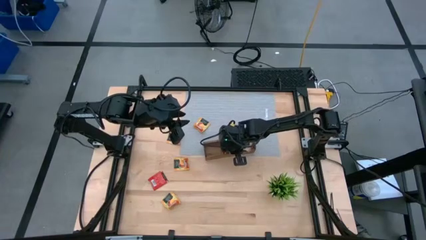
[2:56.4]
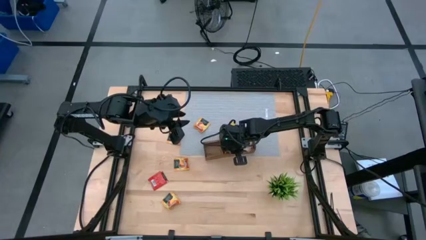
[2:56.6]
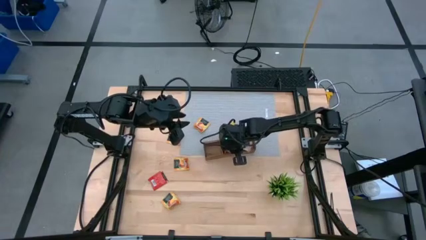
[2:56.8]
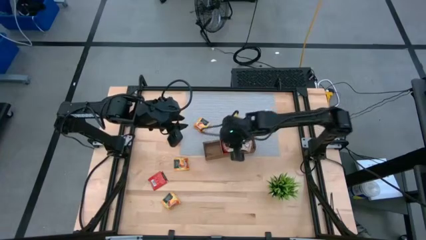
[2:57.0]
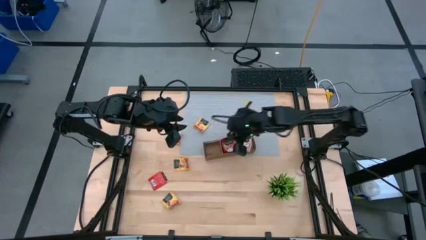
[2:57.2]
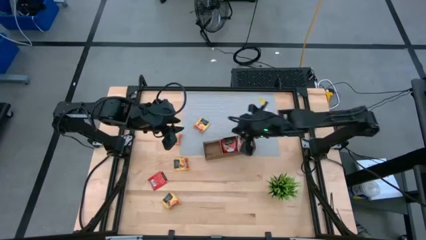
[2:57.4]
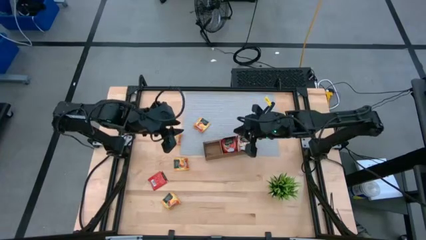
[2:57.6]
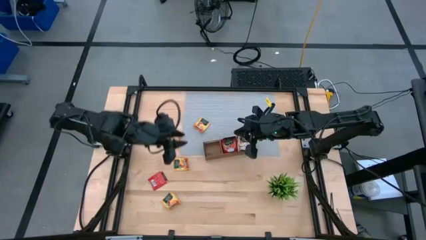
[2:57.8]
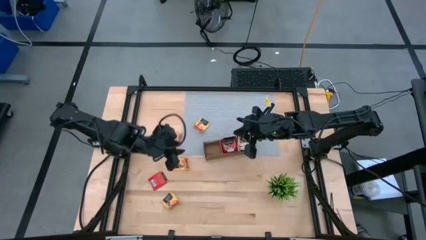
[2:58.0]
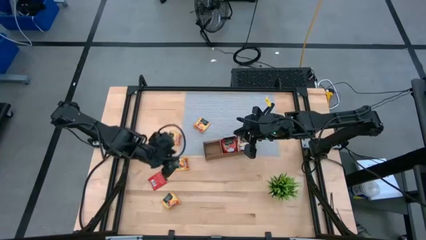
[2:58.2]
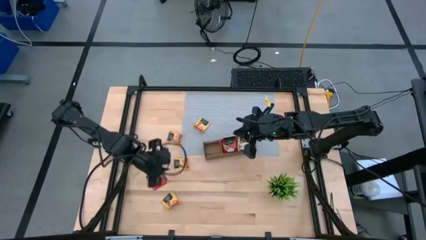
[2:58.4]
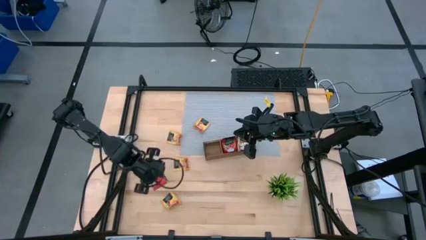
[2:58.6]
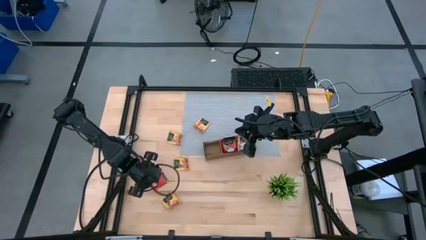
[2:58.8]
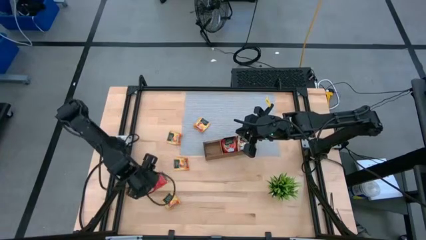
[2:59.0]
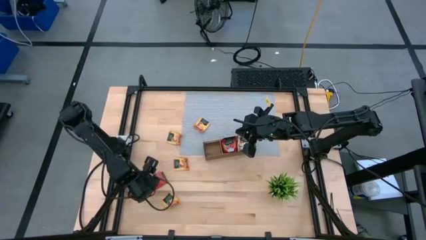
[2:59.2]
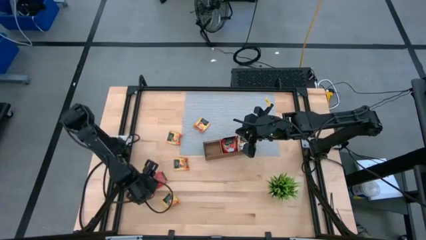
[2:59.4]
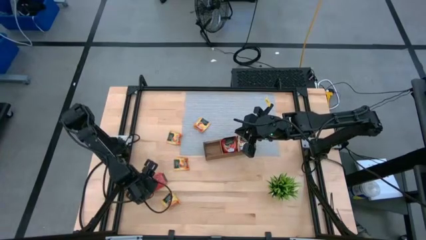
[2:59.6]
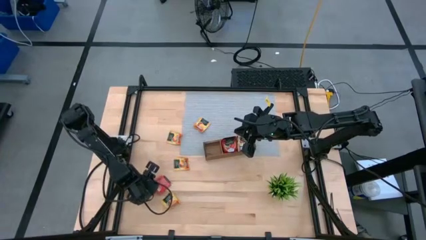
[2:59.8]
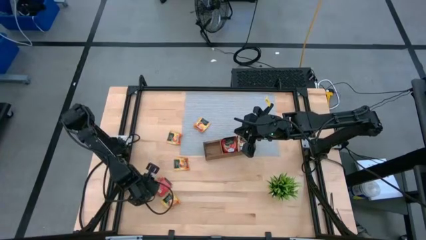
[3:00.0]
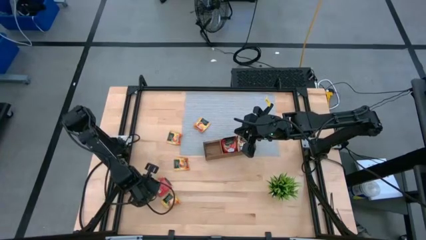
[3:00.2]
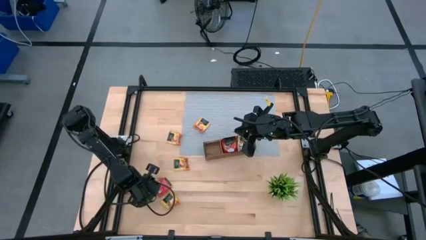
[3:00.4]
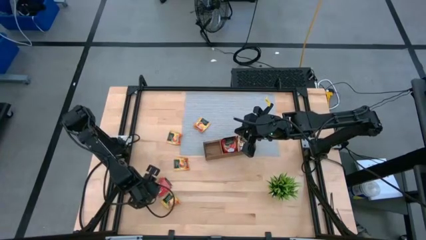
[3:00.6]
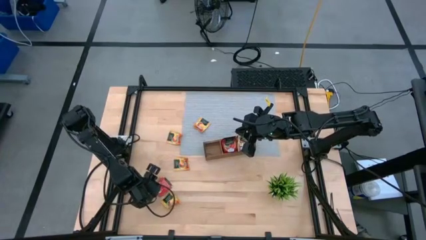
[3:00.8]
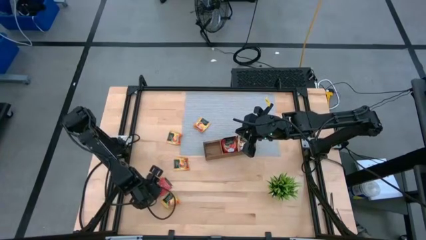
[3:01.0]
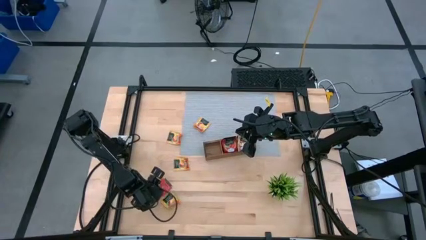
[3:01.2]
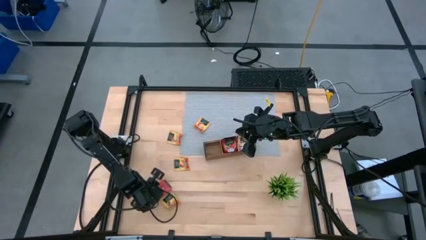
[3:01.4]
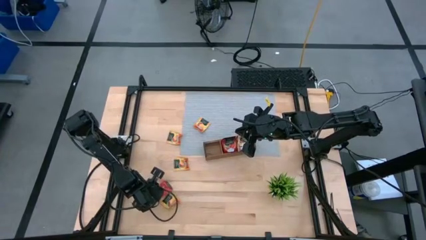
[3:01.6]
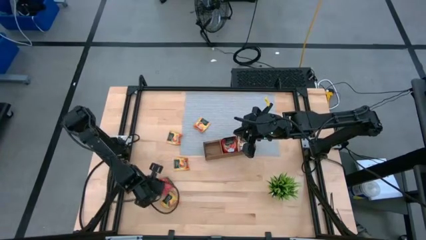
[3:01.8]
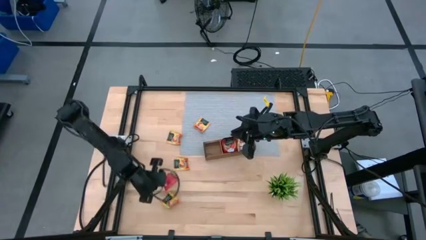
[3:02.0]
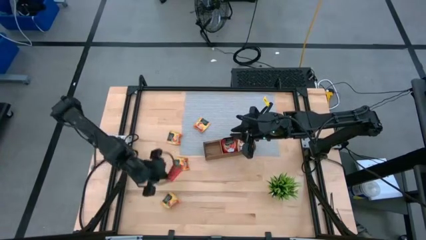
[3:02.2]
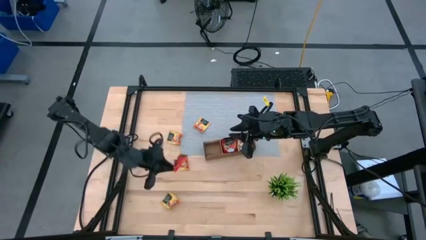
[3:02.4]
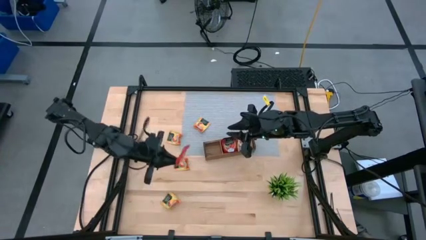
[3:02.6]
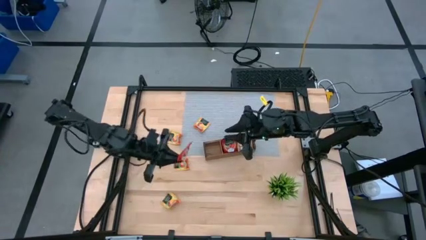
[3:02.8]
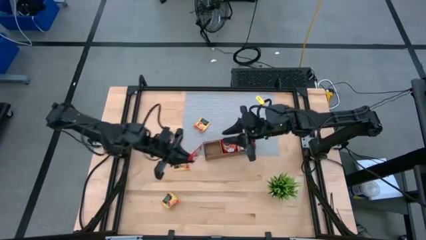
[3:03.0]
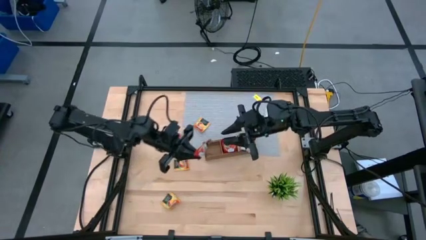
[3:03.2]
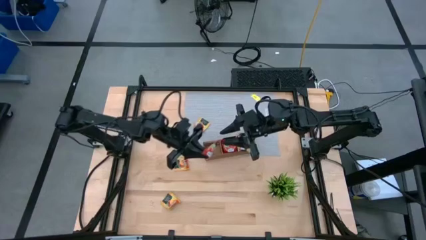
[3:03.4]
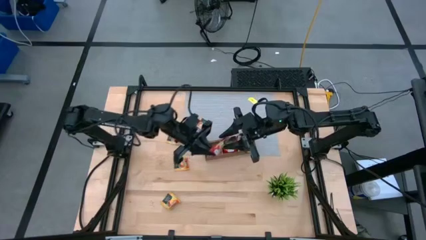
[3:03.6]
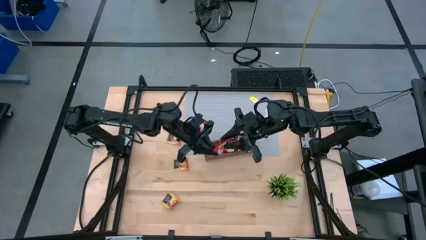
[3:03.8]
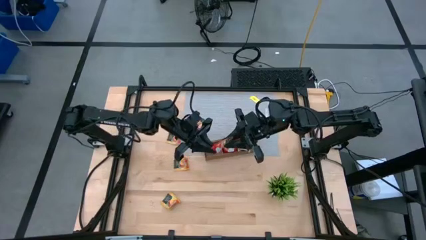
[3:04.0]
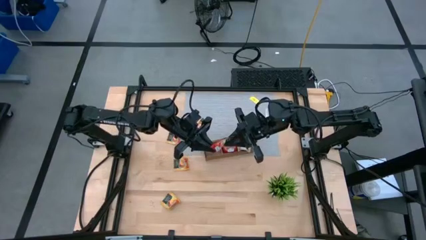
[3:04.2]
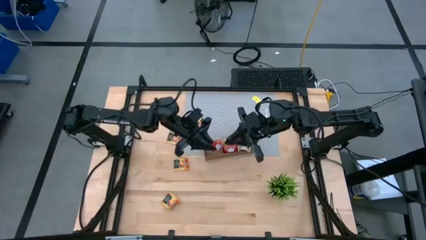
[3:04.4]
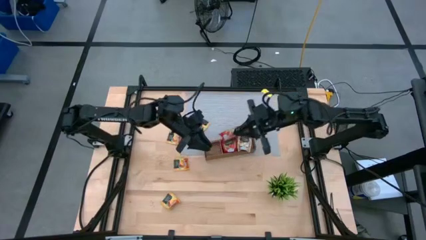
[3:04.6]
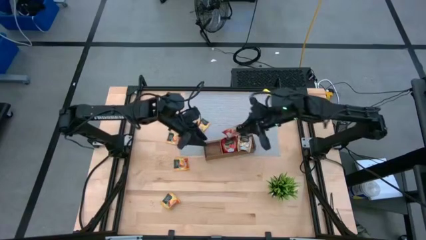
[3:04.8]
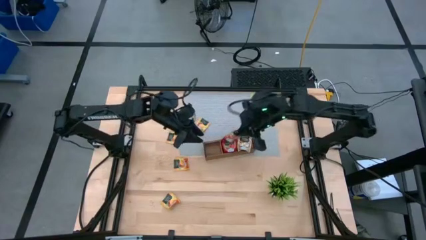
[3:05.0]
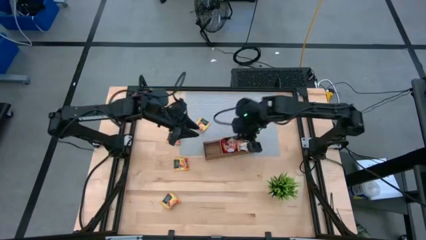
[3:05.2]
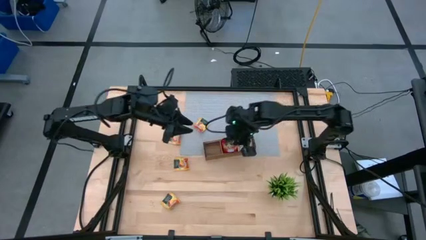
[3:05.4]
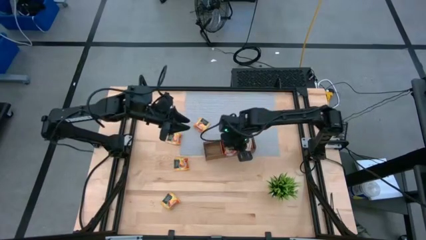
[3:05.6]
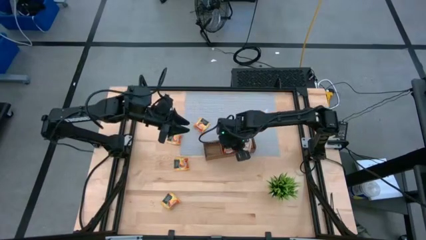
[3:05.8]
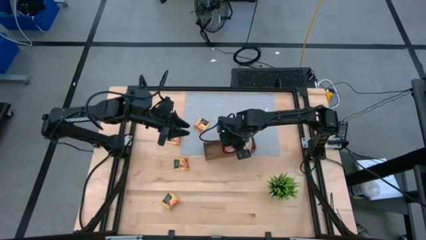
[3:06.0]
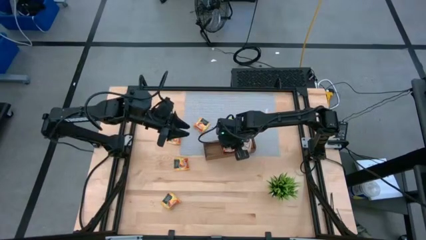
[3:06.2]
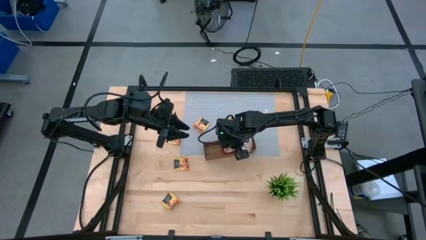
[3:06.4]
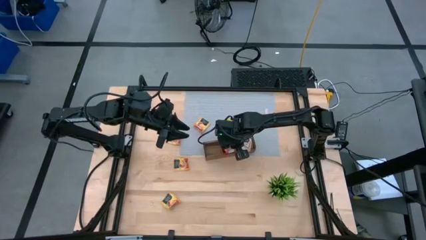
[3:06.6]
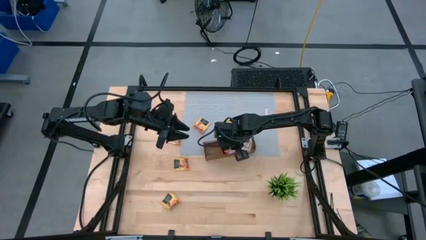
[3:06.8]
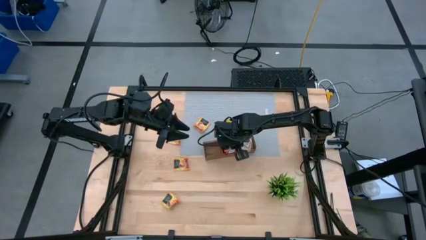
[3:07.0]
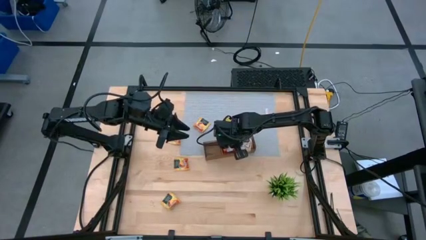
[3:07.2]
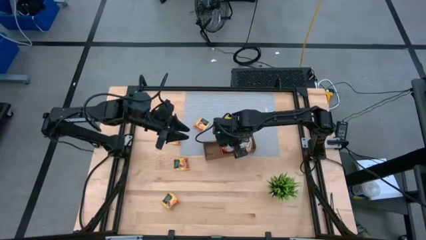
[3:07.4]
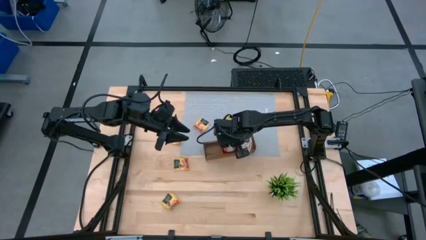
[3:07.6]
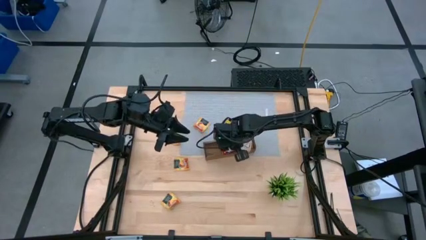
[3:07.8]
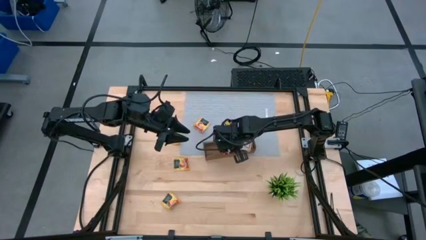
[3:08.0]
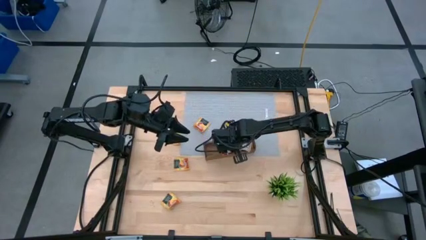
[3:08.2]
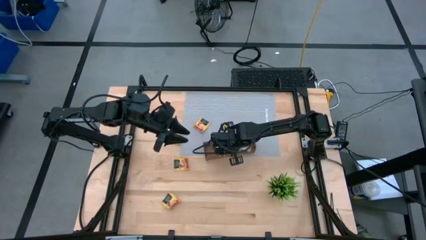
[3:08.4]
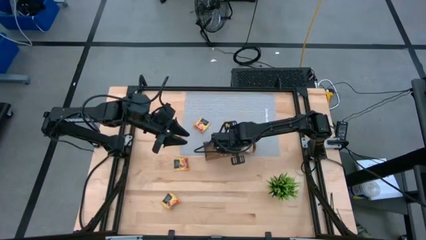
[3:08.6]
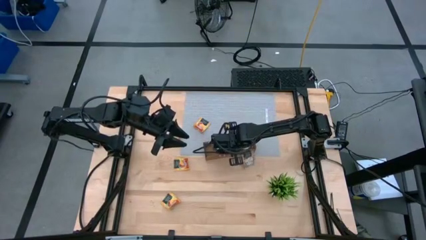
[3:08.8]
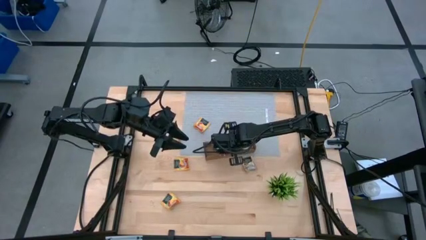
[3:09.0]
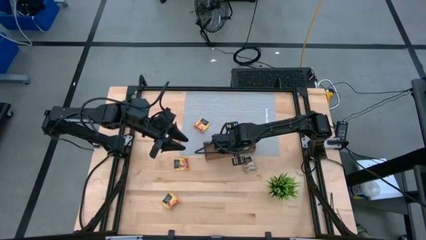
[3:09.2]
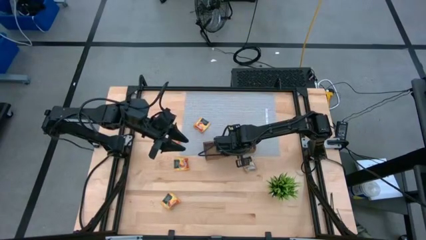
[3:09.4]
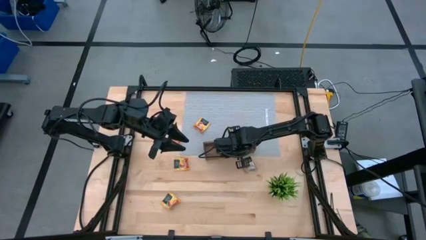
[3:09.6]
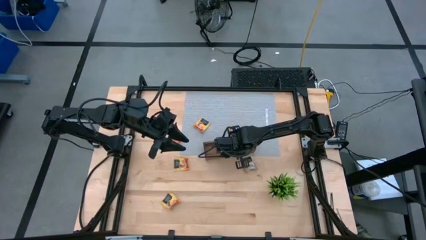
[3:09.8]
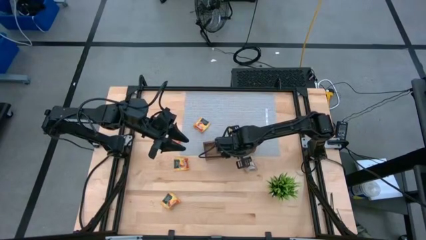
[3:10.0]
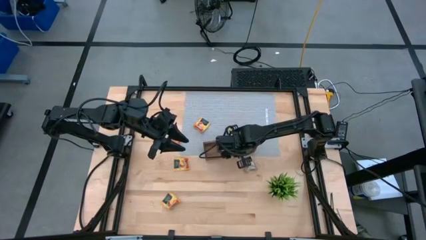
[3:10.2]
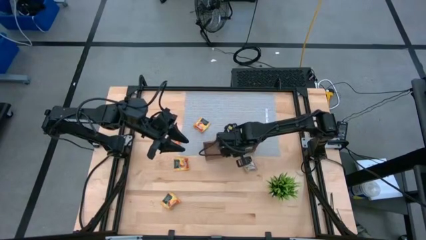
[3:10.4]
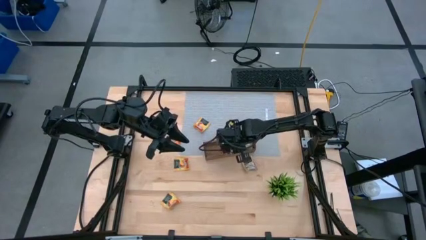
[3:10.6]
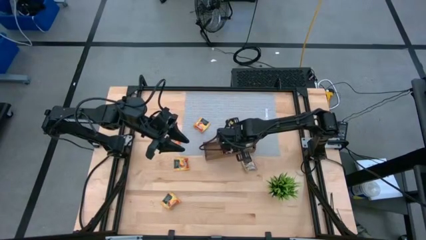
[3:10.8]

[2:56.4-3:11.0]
Task: Pick & Place Tea
Put the red tea bag into the middle section of the wooden organizer

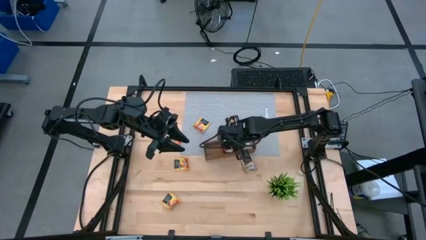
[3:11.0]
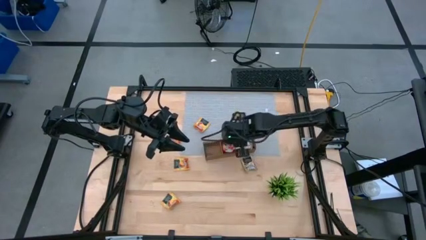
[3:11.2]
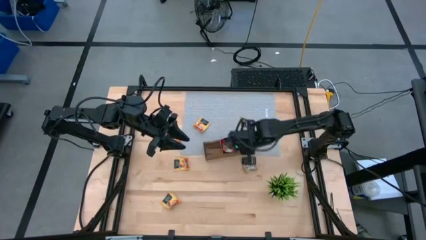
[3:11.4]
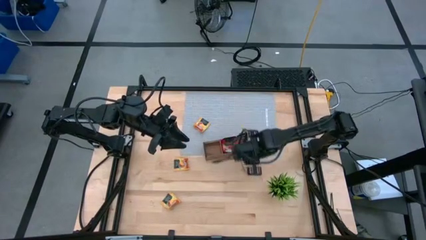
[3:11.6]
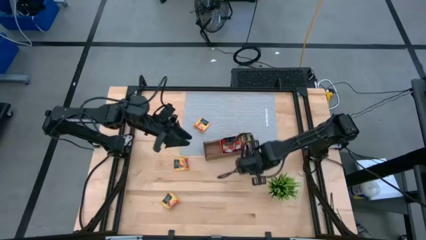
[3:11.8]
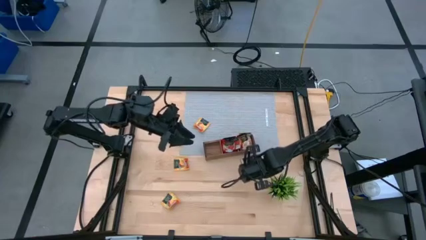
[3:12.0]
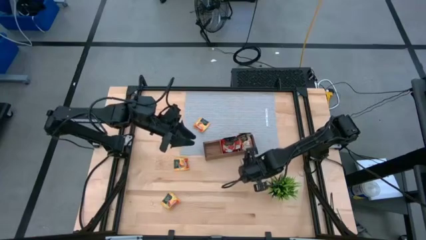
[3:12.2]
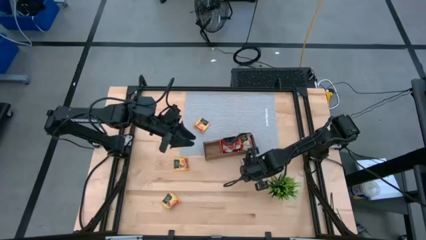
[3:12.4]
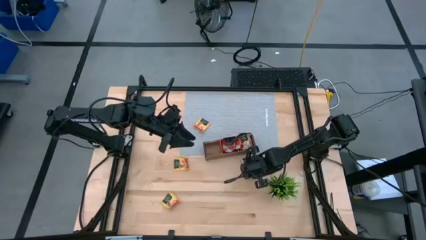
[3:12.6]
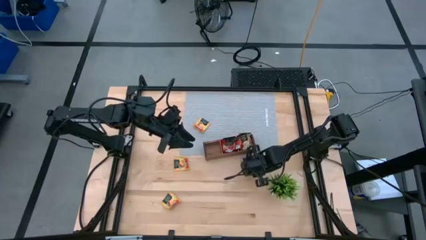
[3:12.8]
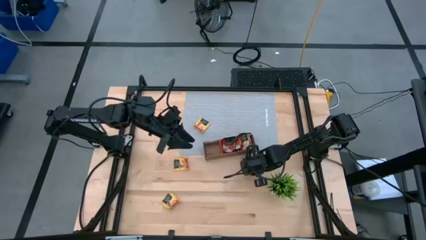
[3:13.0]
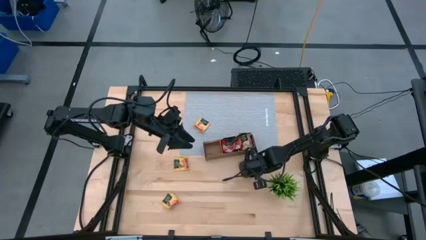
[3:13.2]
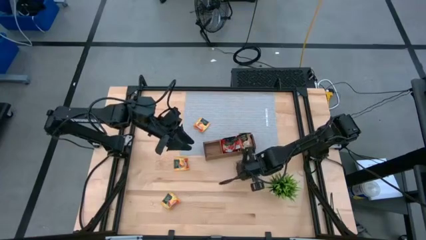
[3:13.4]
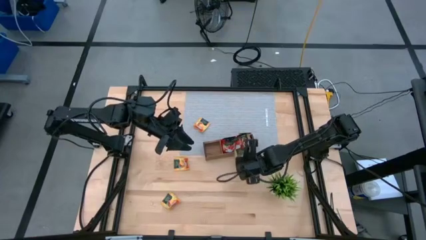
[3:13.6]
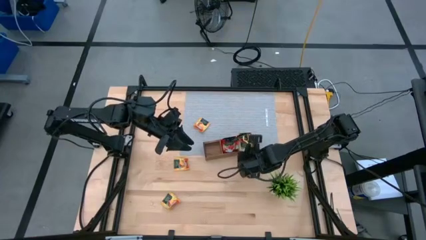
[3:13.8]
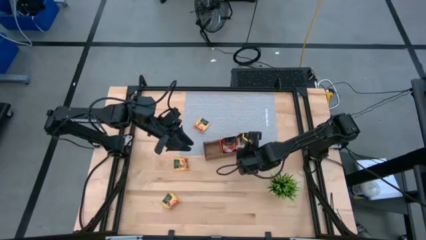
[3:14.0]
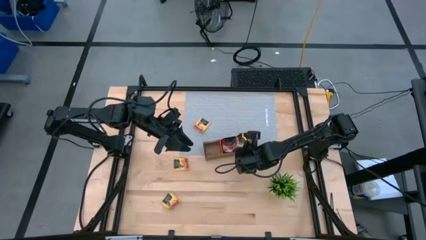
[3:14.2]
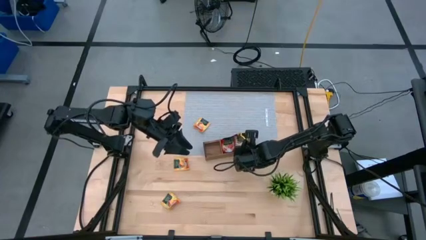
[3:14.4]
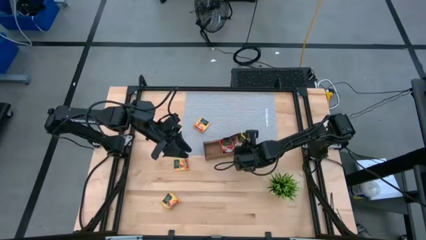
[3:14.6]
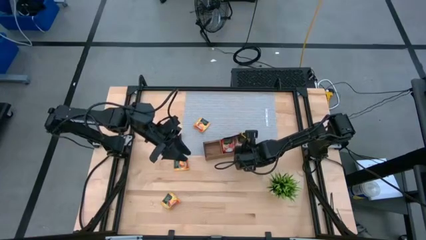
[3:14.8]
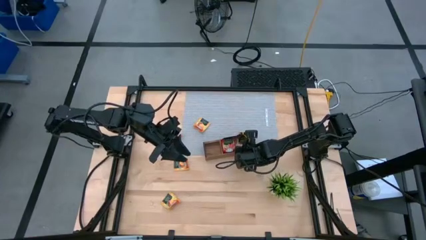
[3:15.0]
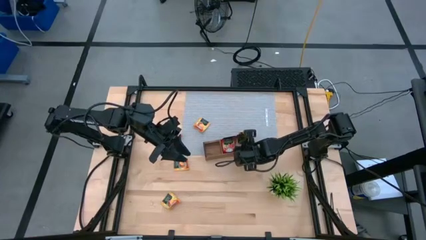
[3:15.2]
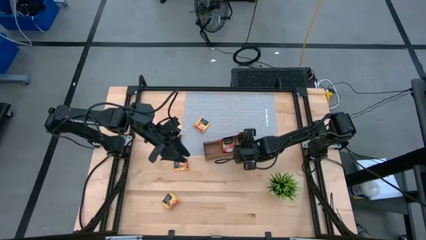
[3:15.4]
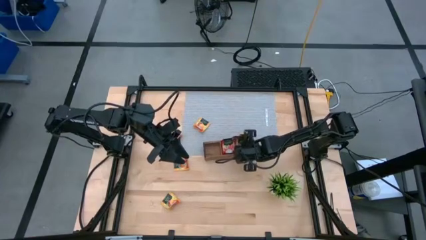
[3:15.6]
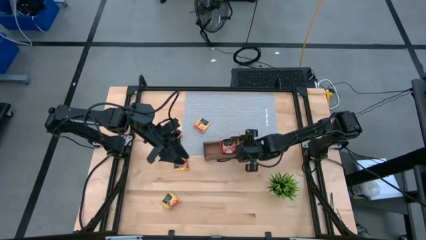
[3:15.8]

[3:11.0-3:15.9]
Put the brown tea bag into the right section of the wooden organizer
